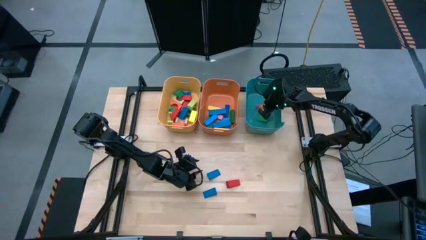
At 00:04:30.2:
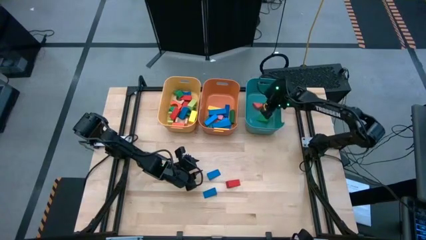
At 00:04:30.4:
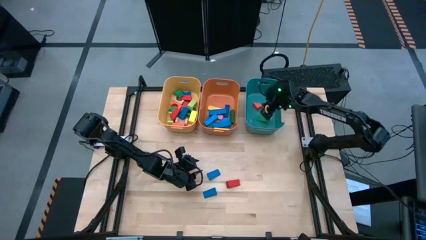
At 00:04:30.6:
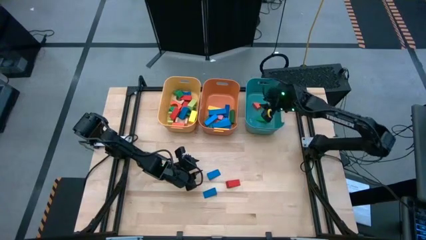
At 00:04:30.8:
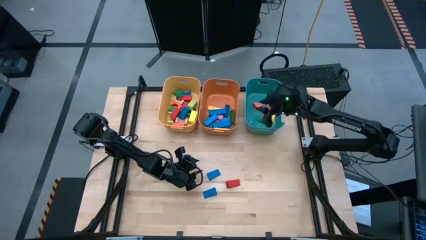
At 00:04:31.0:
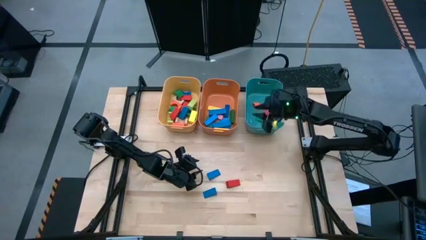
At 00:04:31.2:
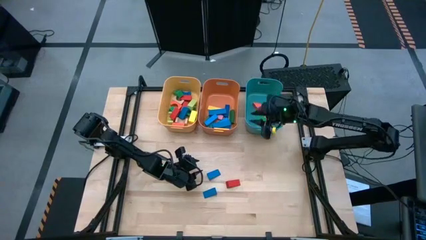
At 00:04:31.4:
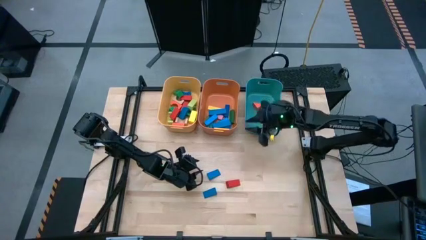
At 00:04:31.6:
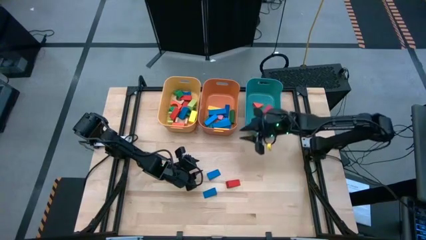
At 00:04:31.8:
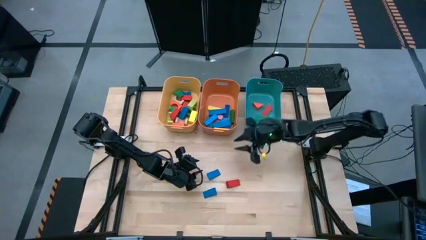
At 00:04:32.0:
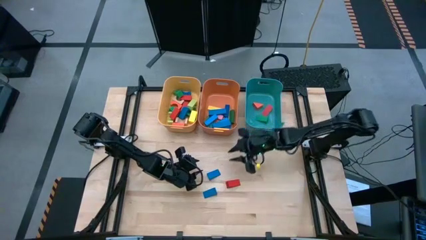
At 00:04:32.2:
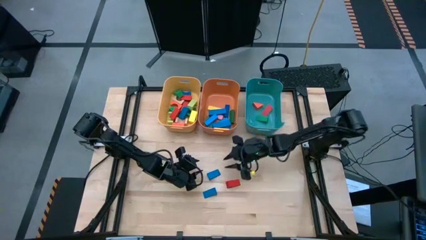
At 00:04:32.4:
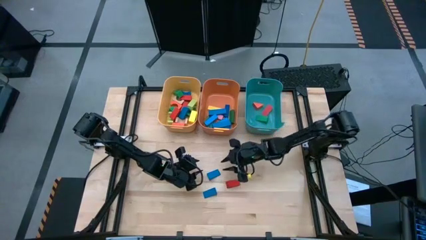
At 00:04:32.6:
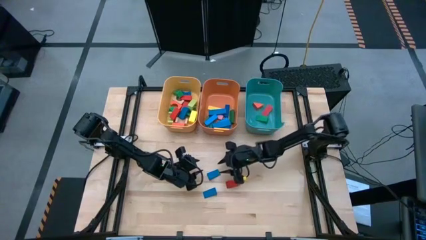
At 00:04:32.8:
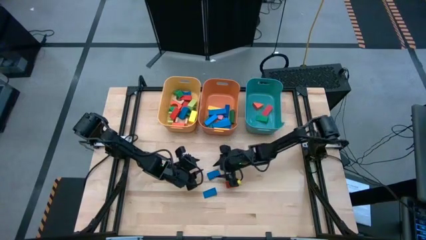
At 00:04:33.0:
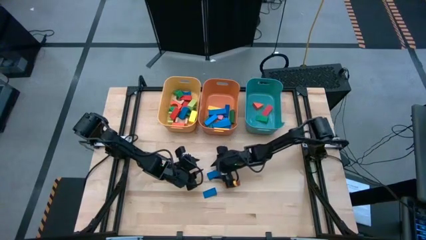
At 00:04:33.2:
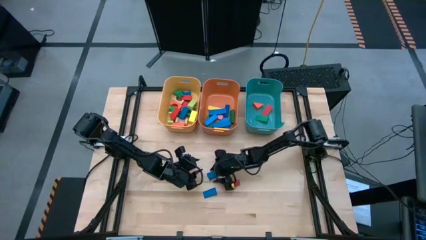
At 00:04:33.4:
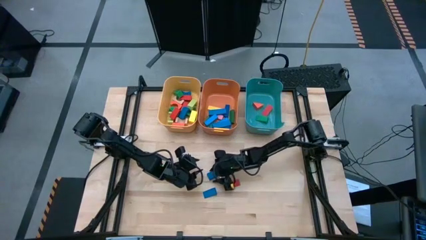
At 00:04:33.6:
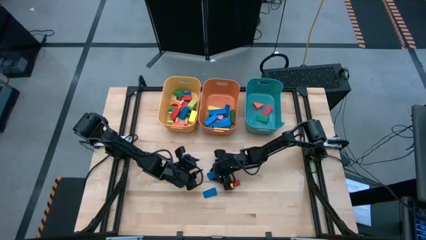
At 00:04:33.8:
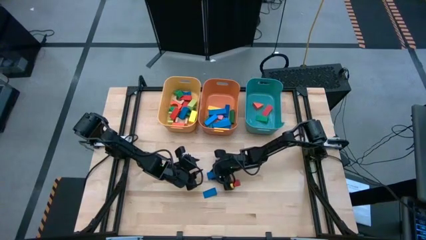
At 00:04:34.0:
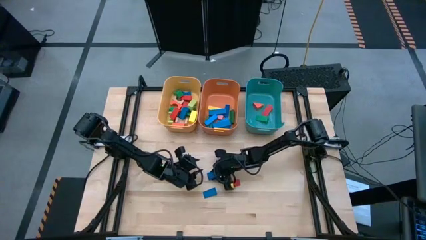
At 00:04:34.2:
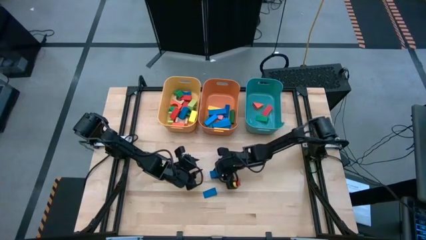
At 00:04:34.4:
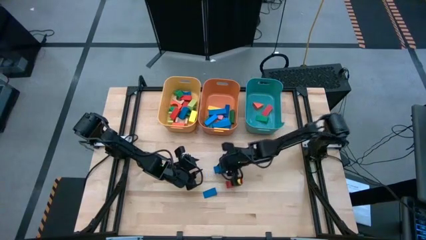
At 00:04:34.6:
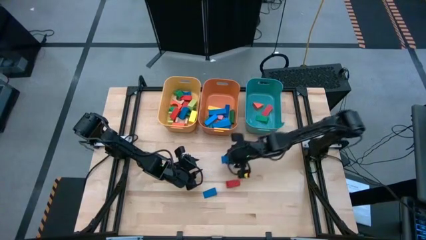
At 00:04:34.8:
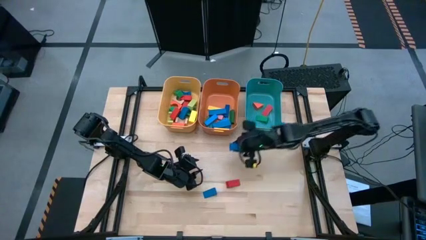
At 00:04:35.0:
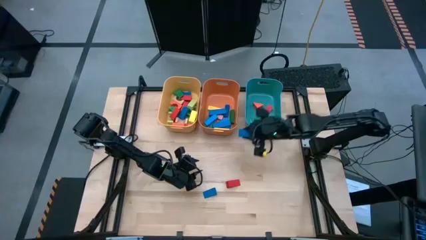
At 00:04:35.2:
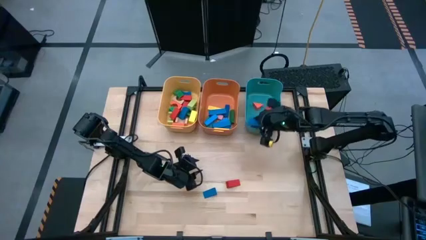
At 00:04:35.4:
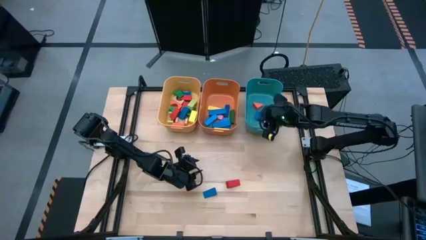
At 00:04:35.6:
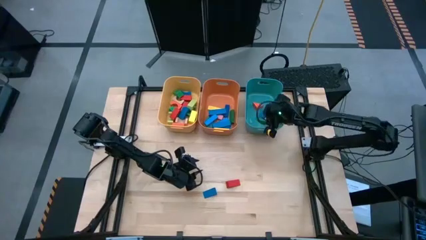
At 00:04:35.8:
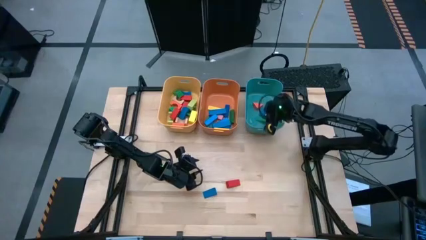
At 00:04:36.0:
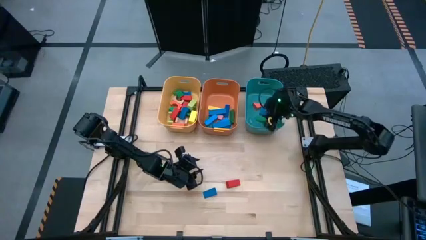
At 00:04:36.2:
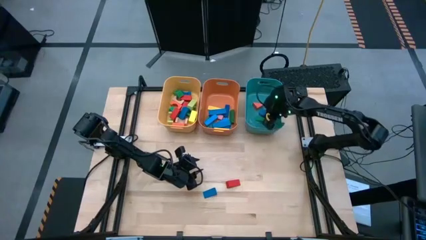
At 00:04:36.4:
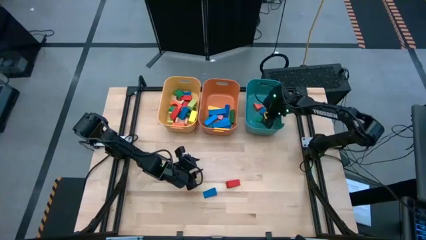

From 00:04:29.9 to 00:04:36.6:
Task: Sort blocks by size
Put the blue triangle block into the blue bin

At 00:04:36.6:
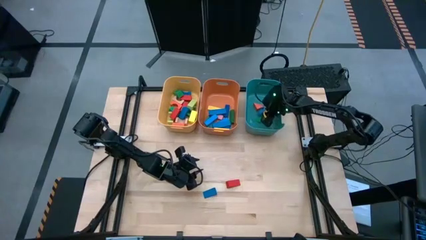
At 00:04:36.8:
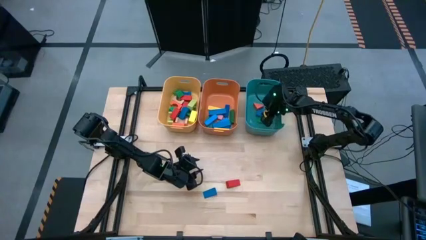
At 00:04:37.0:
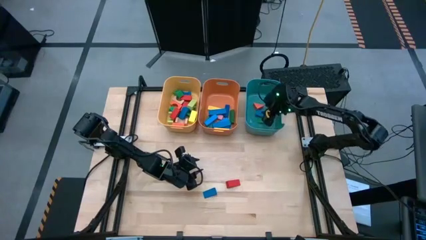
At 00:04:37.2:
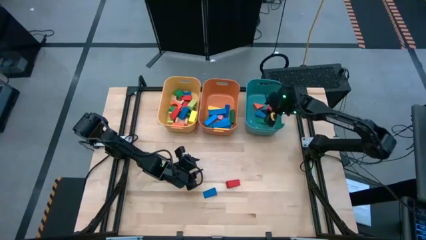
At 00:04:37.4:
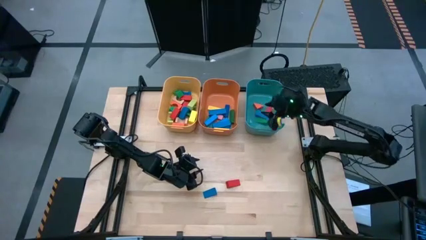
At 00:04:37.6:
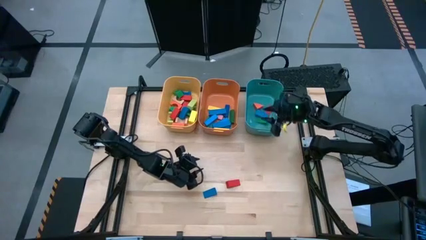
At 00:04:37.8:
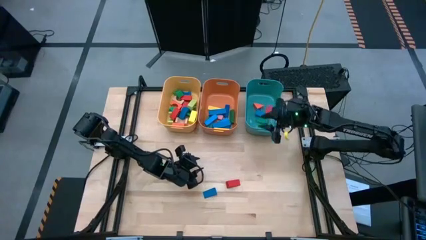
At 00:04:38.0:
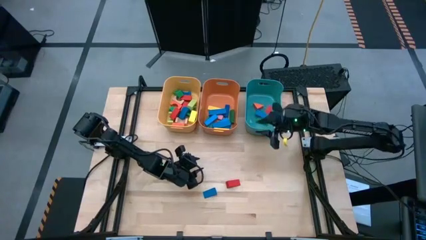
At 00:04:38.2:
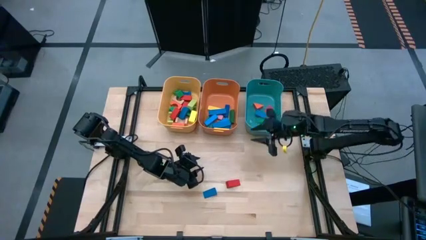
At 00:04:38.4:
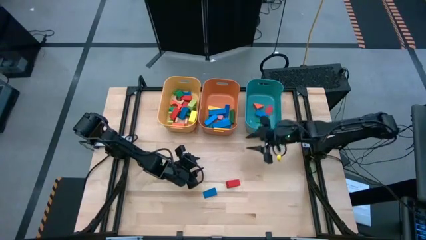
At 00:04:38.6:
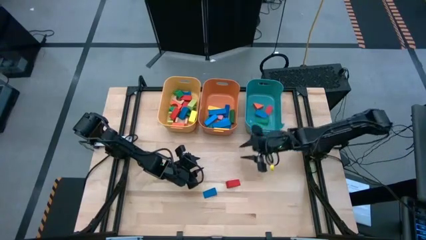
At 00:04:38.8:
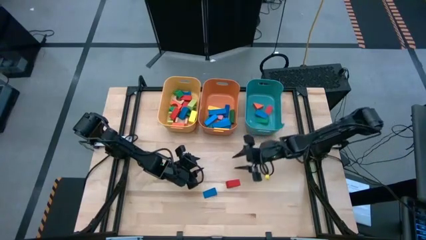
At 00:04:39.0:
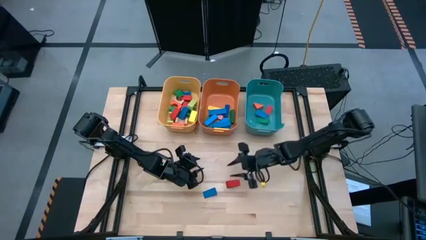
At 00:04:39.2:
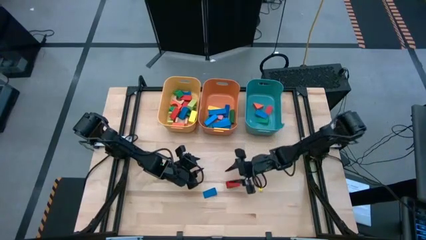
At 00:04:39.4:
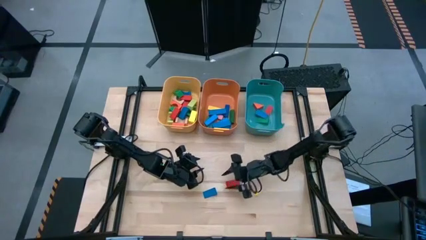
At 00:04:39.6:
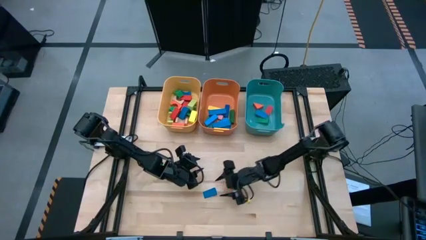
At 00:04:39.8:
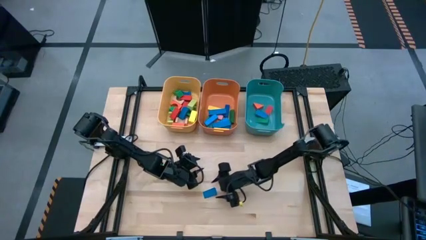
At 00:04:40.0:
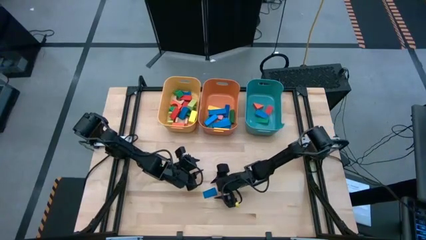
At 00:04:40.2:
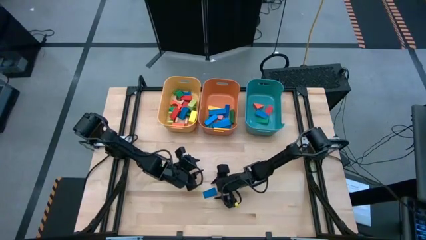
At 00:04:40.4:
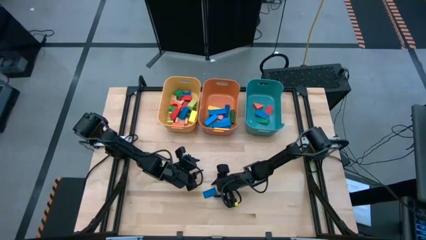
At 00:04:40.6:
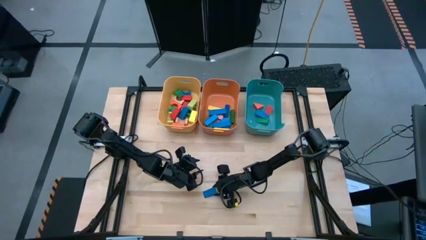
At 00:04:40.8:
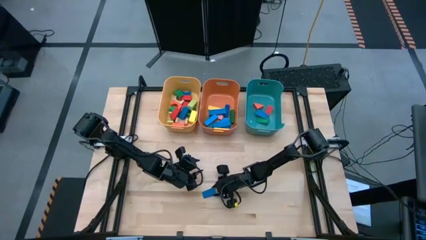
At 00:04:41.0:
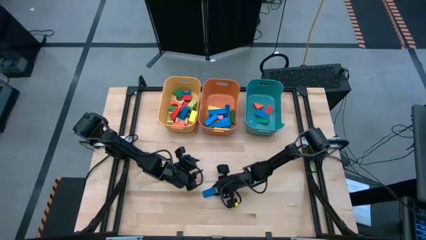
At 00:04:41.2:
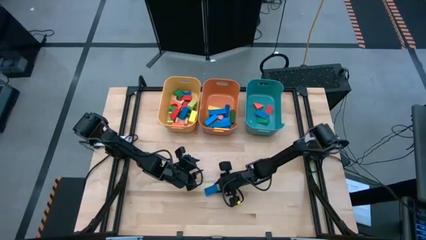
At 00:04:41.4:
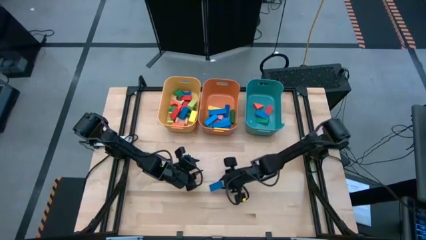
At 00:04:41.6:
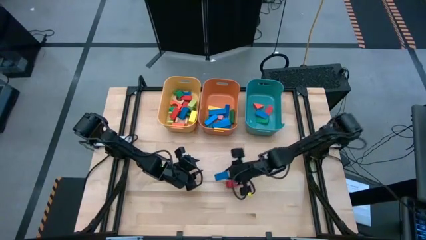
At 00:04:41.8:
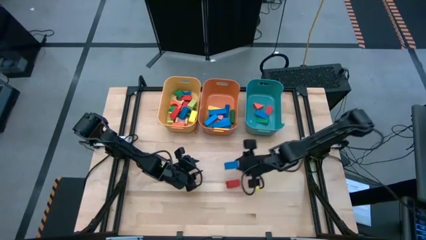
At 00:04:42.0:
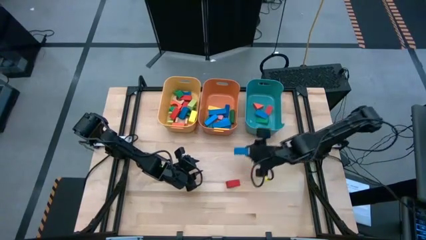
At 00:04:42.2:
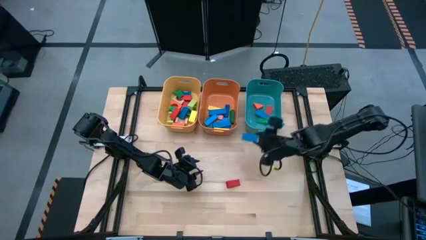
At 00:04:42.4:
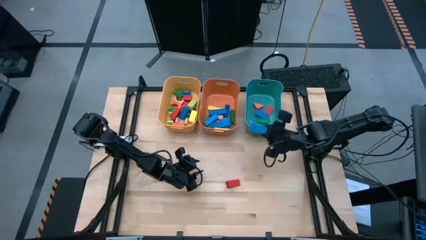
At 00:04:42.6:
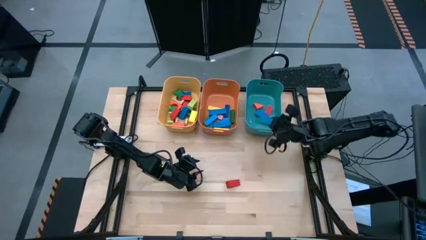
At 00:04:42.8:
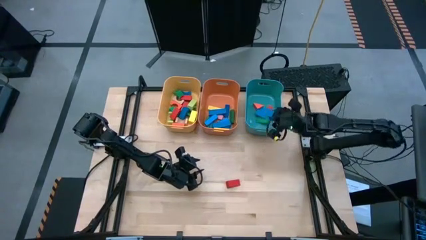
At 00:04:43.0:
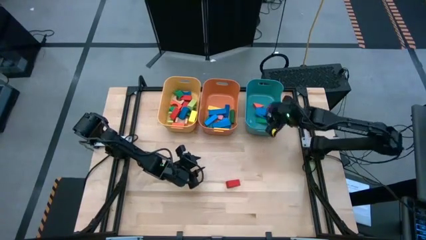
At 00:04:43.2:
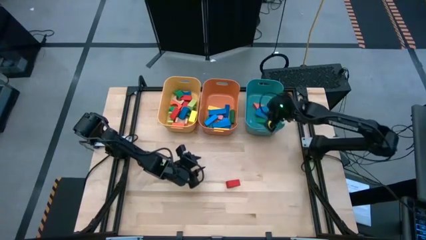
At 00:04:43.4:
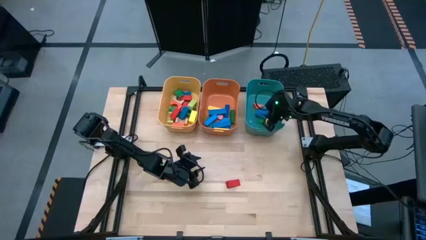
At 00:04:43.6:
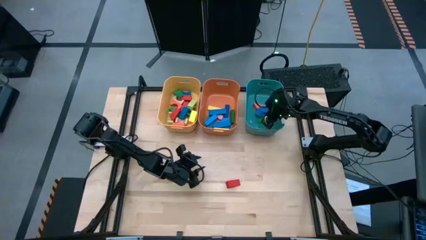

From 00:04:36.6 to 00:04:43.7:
Put the blue triangle block into the blue bin
